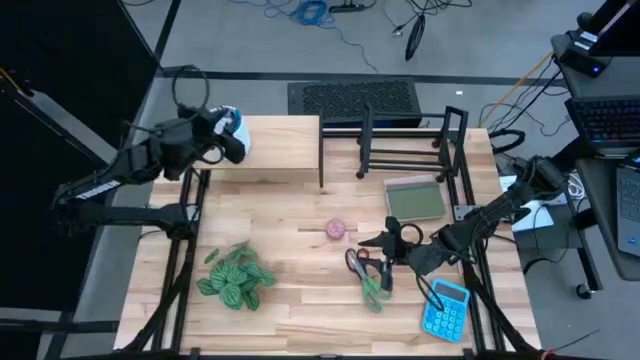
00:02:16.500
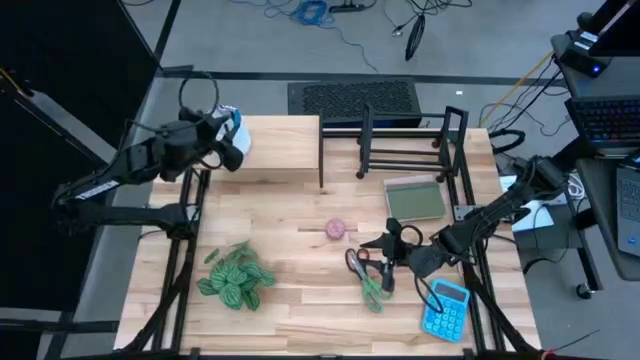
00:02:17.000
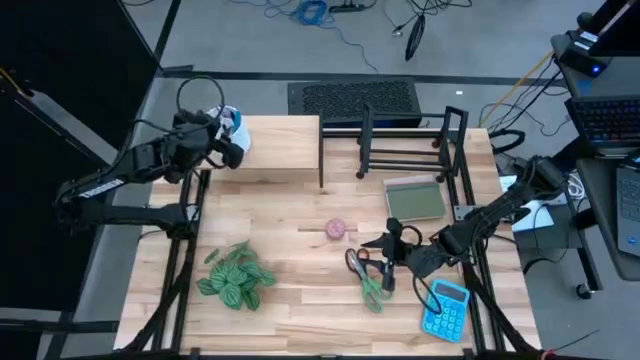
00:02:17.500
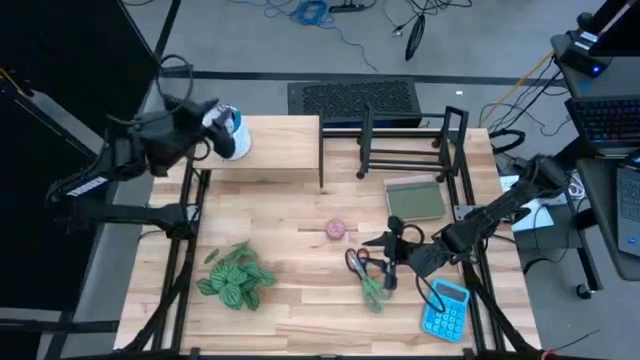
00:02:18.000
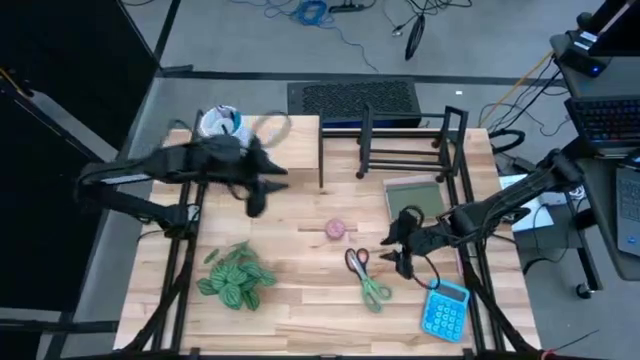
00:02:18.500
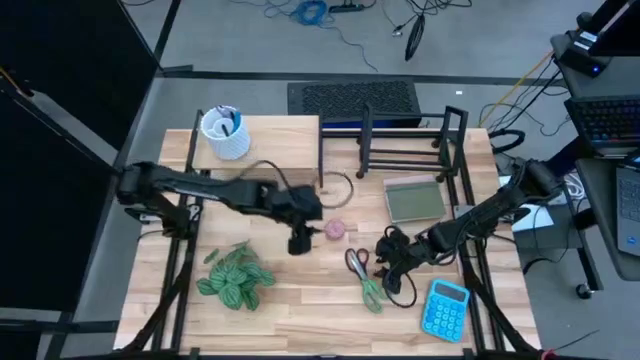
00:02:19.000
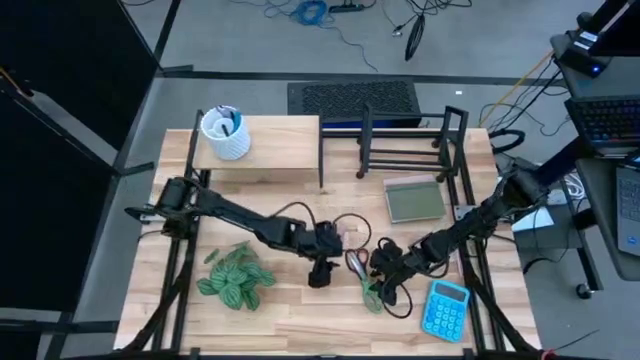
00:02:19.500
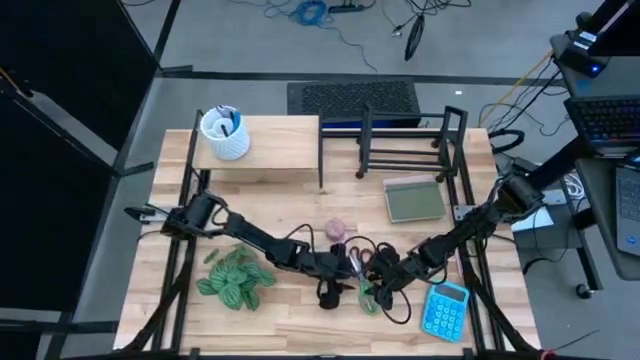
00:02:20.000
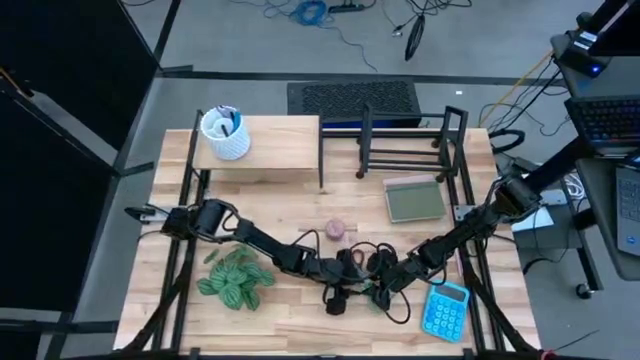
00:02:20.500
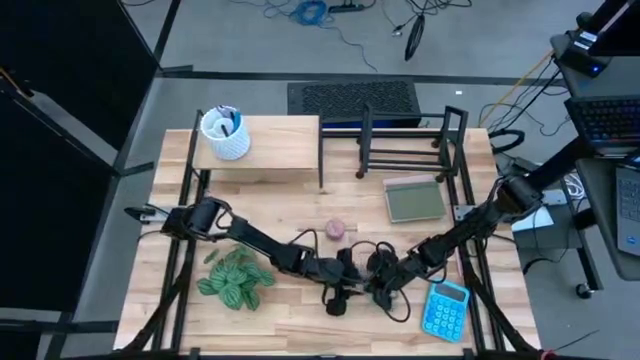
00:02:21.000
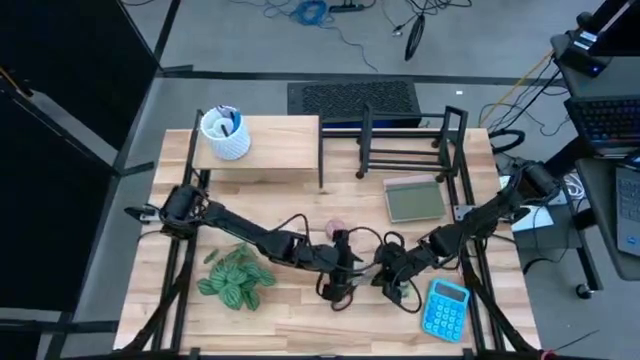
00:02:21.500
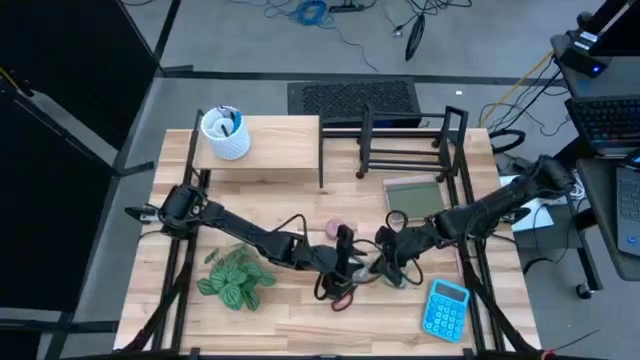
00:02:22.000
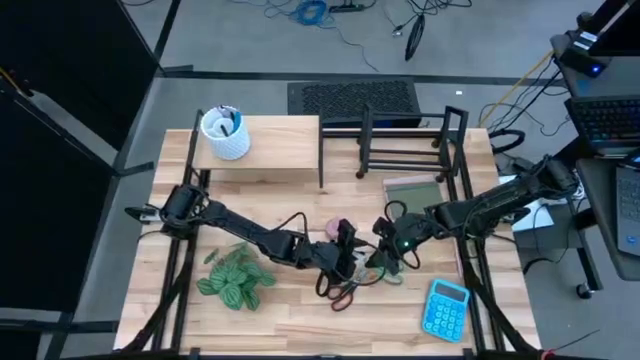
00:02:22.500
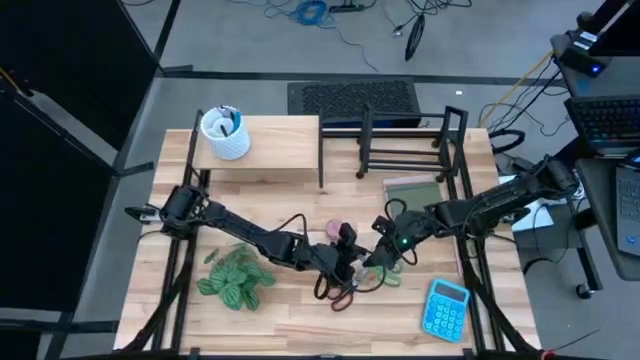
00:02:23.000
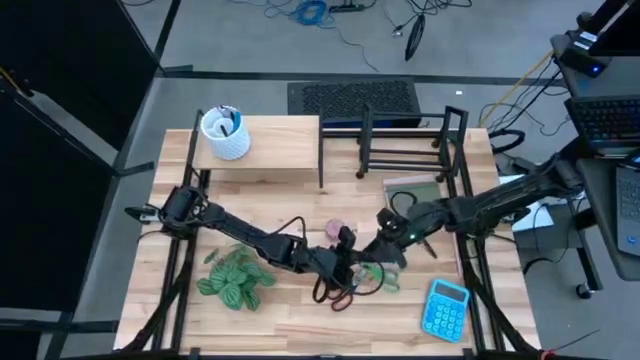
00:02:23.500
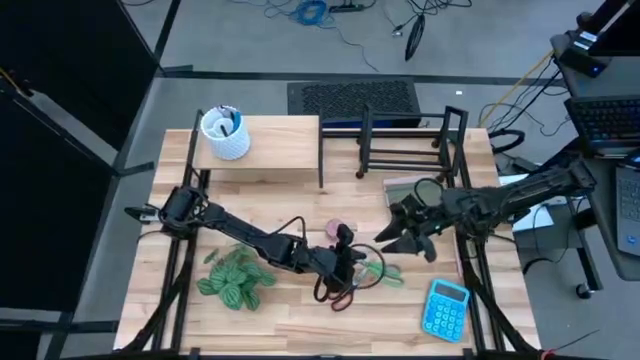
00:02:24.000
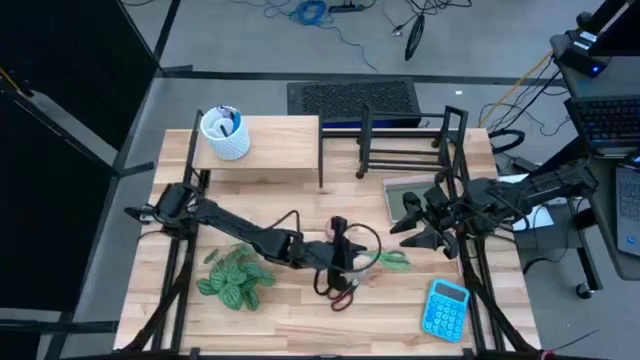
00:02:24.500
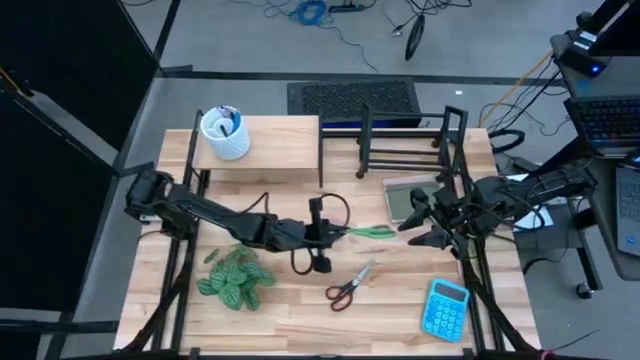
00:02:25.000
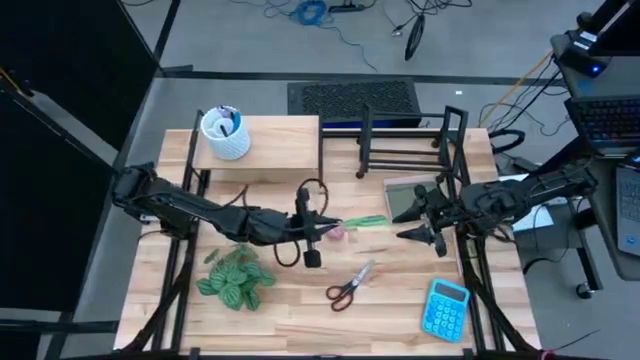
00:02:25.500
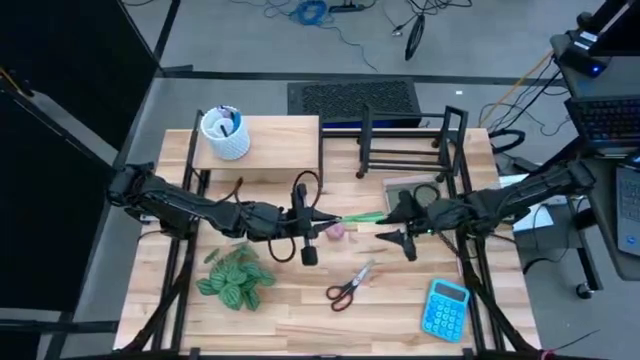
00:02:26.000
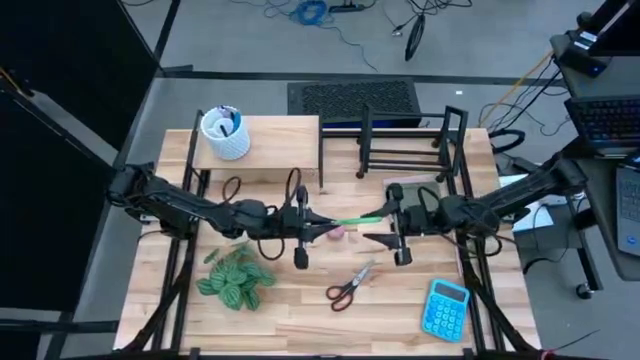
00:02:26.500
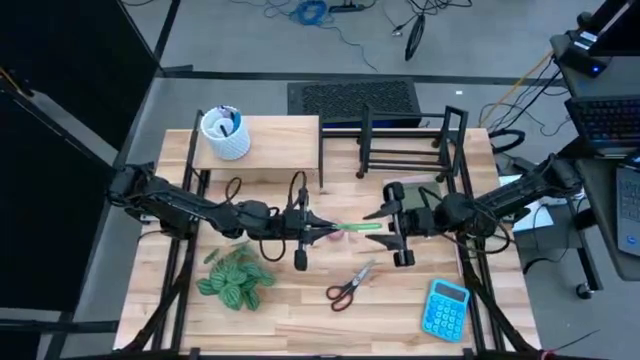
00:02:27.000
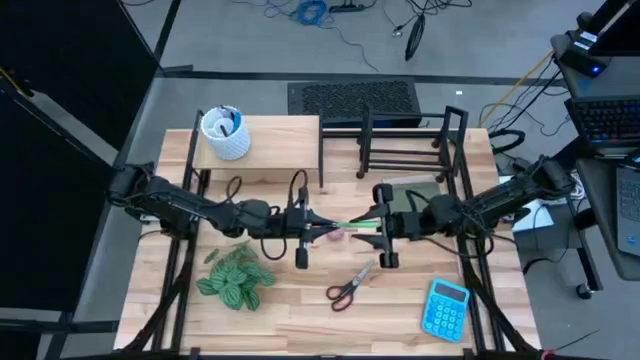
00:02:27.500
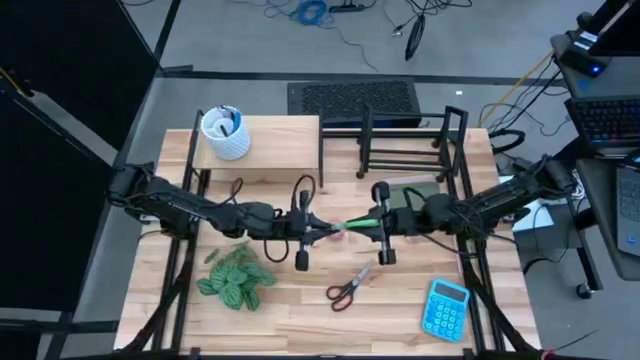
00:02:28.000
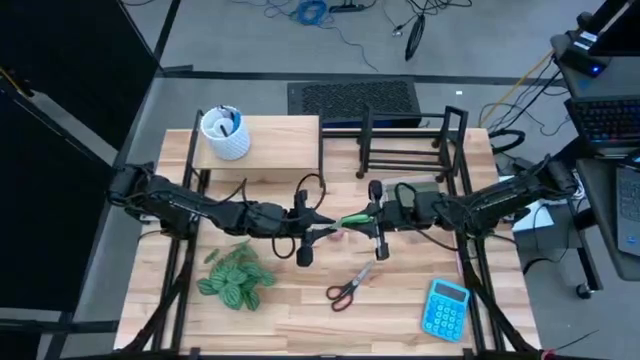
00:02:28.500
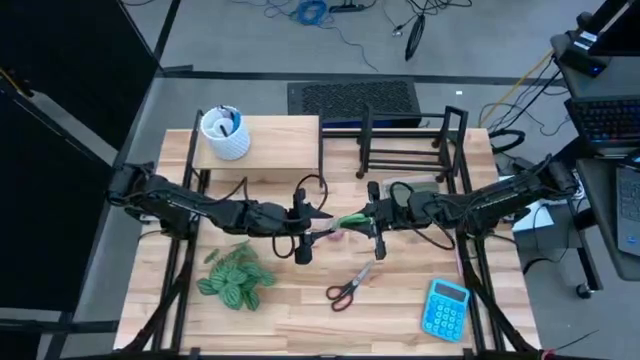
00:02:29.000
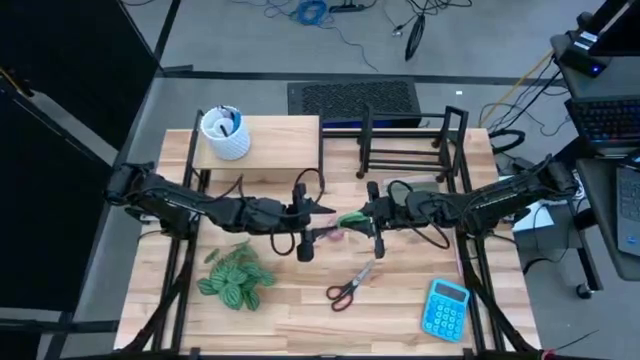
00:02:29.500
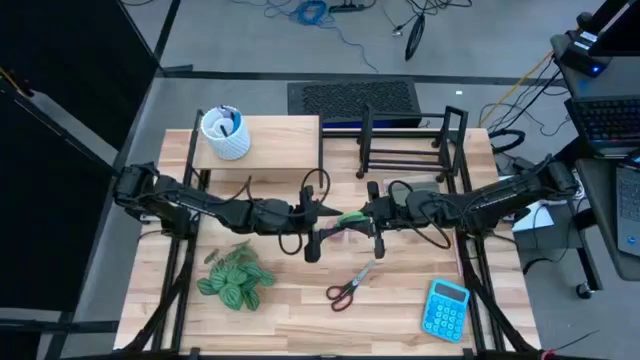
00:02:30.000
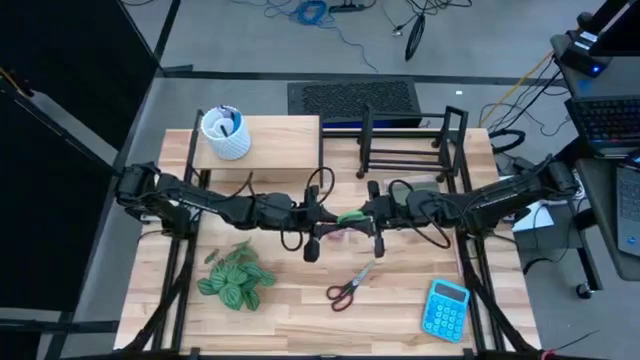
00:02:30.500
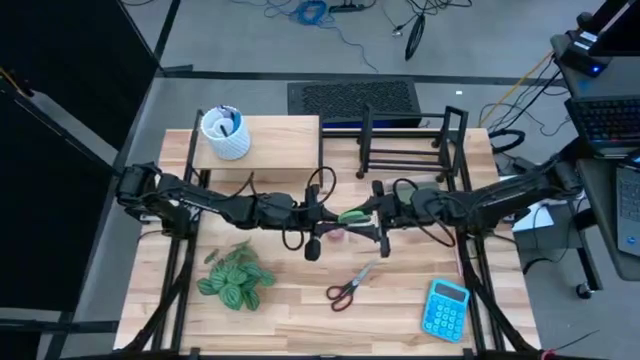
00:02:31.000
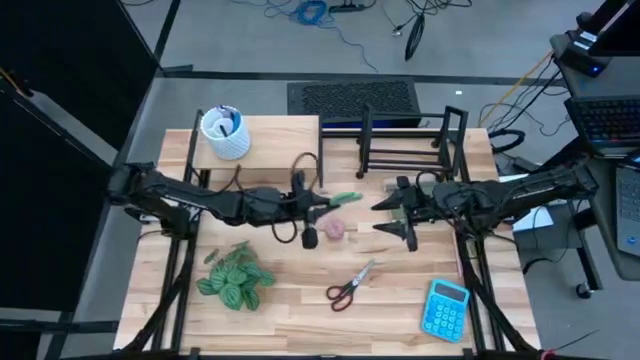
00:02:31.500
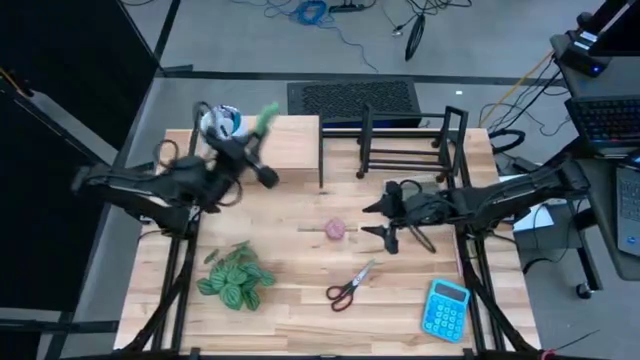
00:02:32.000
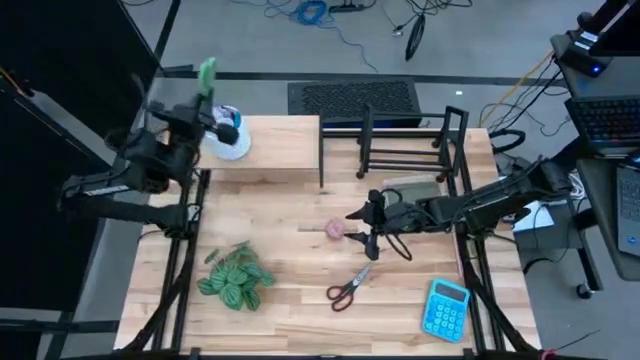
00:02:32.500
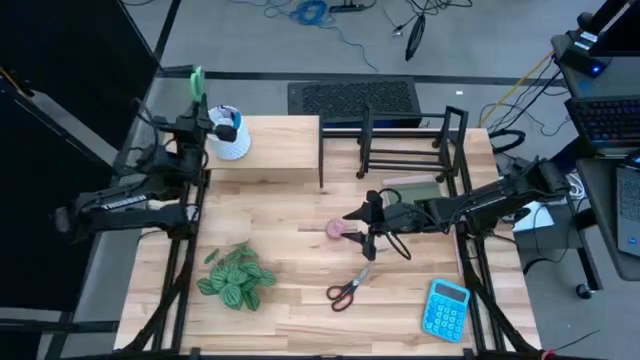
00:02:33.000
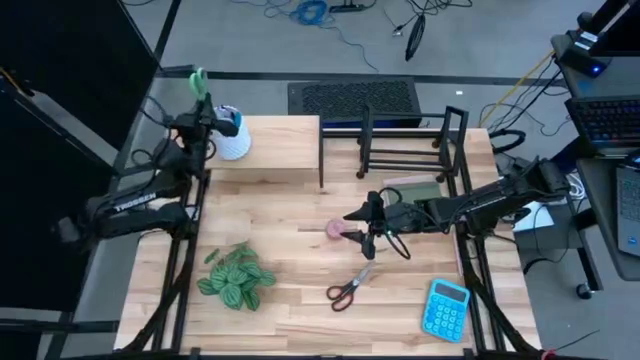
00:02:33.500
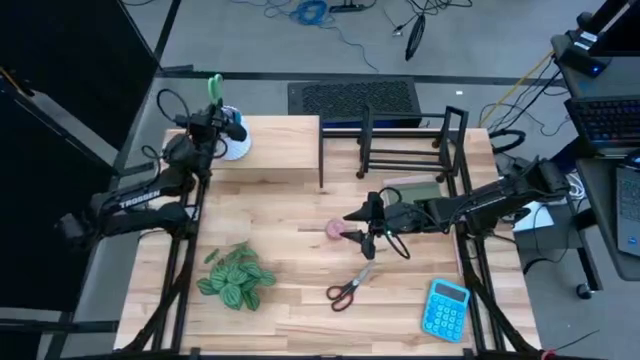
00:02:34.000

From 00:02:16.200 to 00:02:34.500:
Task: Stock shelves
Put the green scissors into the white pen holder

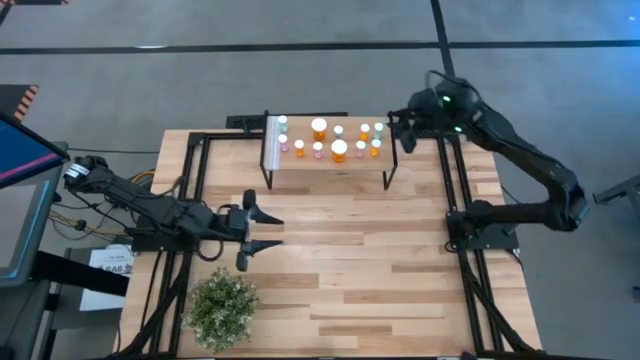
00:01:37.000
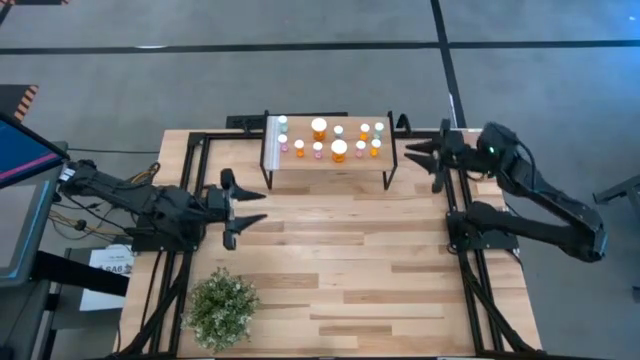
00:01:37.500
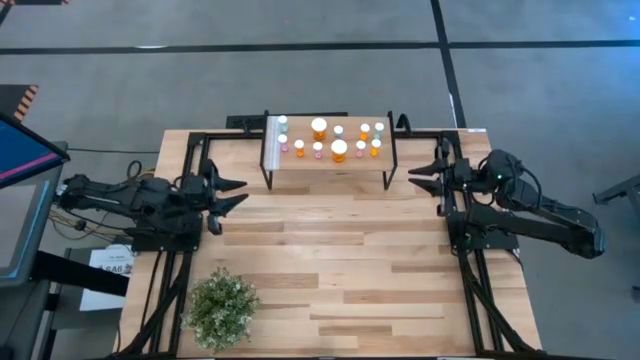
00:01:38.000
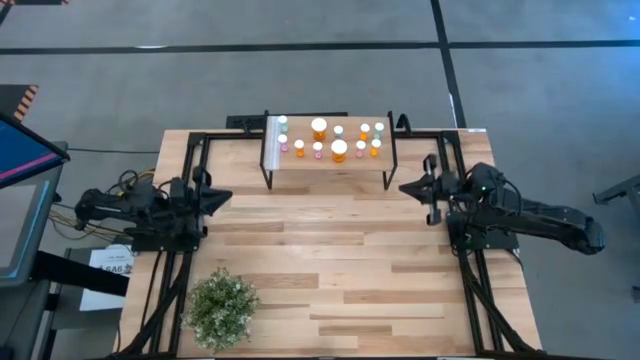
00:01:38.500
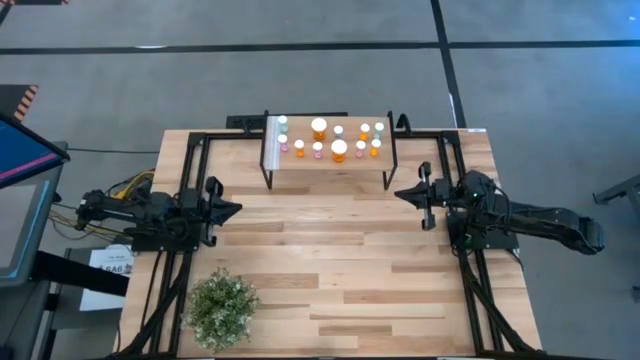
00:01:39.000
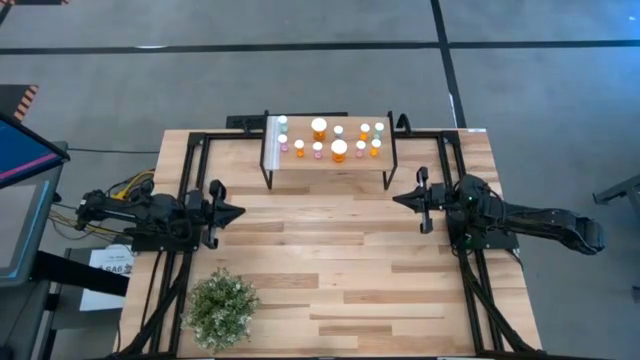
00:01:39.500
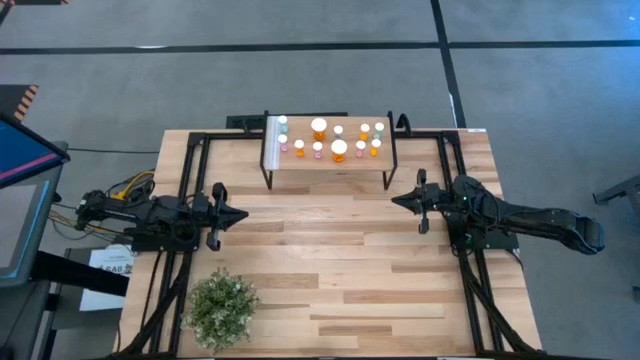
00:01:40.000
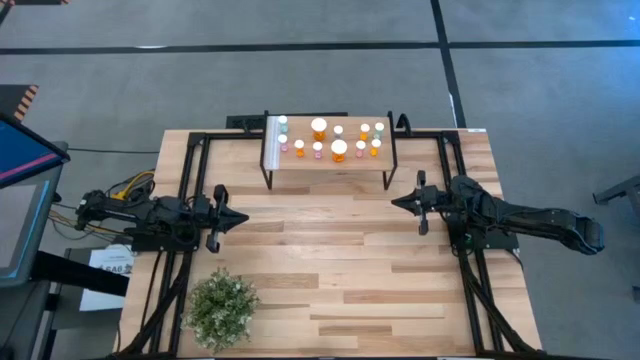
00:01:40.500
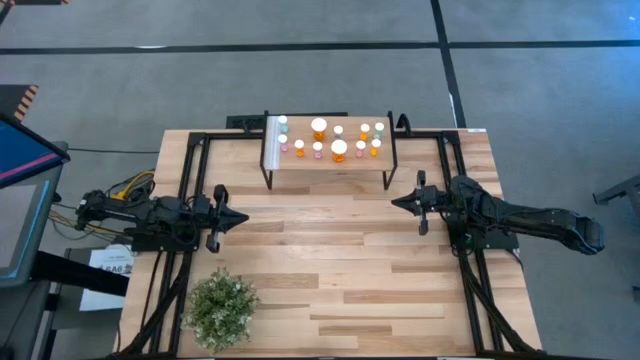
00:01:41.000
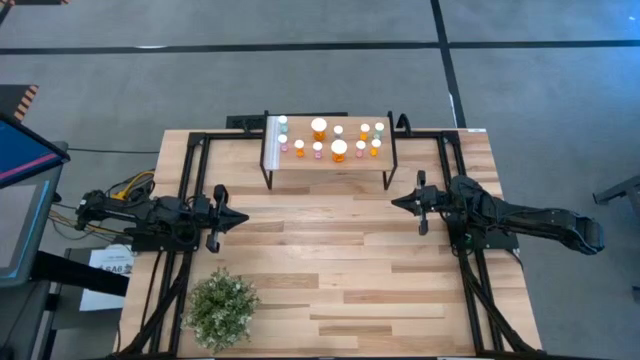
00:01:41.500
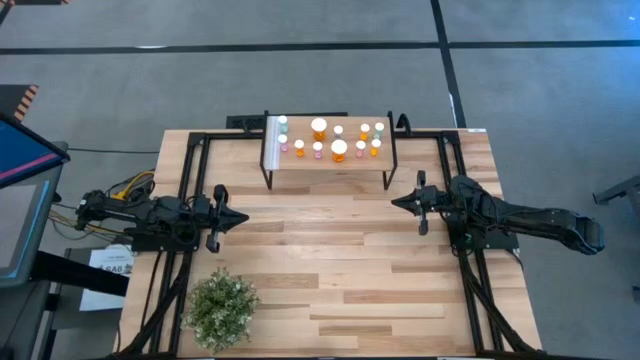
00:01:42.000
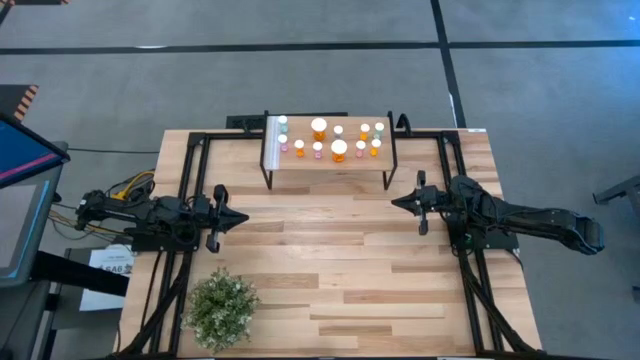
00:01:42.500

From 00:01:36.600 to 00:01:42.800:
Task: Pick and place medicine bottles onto shelf by color
Return to Home Position
